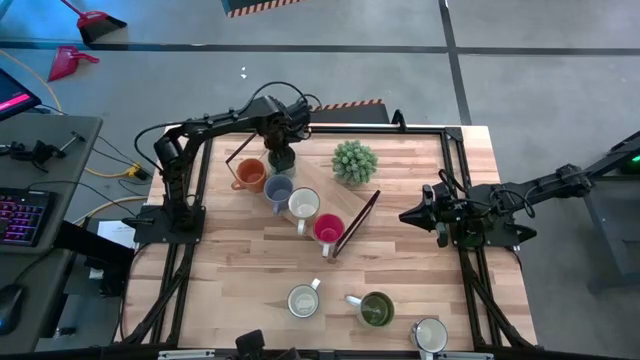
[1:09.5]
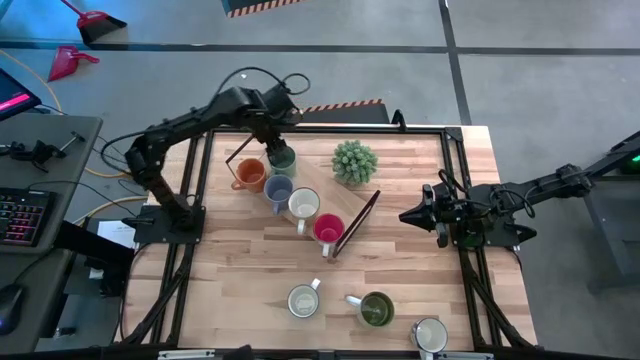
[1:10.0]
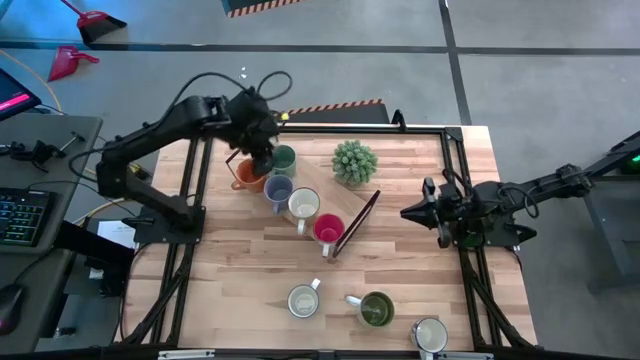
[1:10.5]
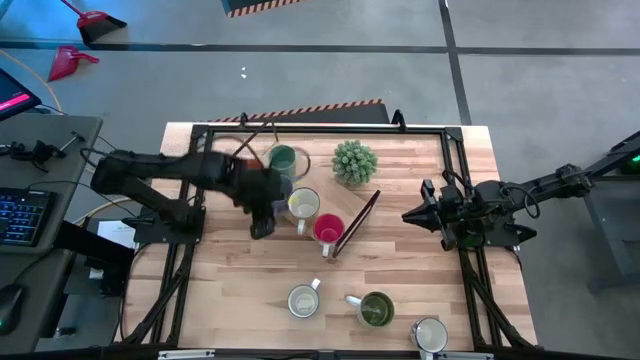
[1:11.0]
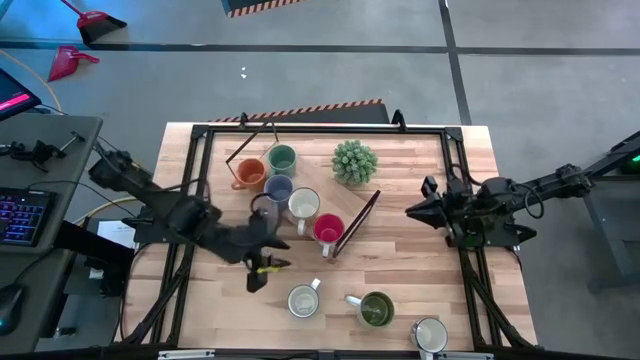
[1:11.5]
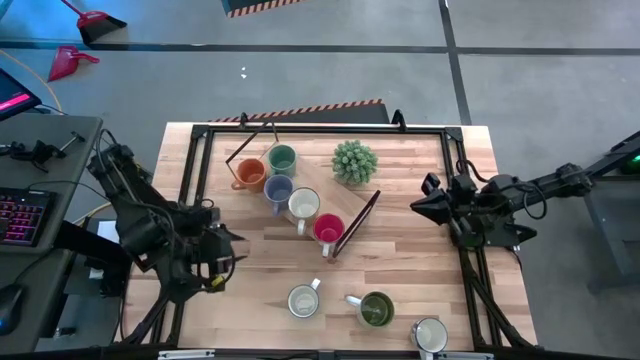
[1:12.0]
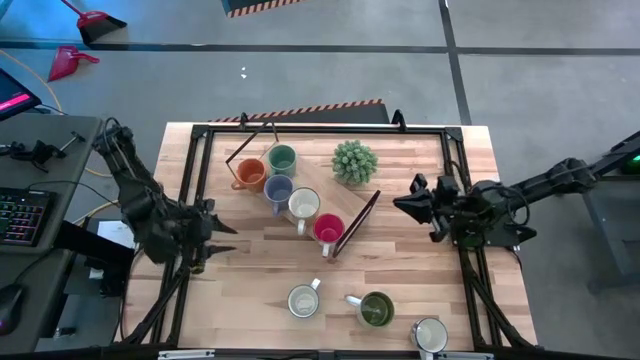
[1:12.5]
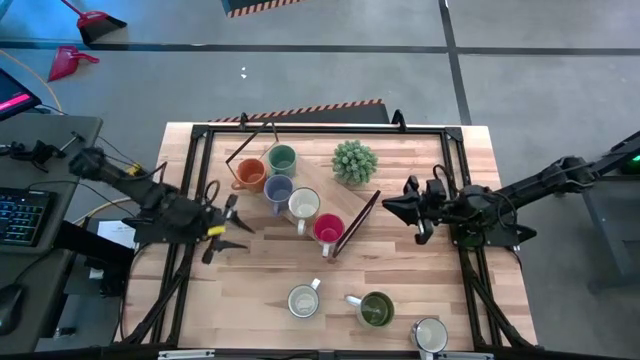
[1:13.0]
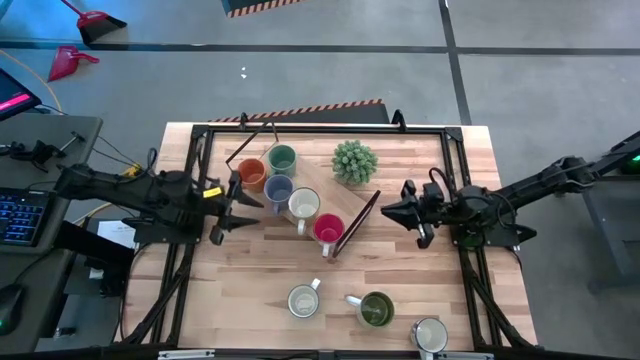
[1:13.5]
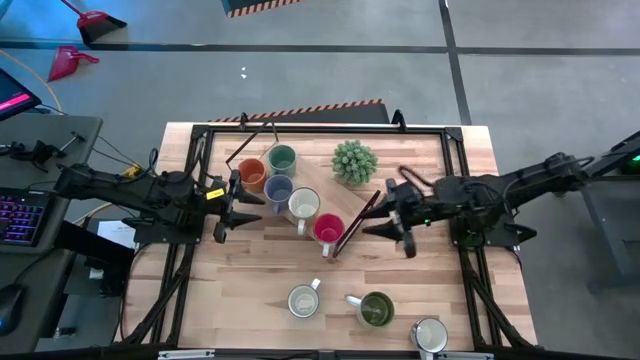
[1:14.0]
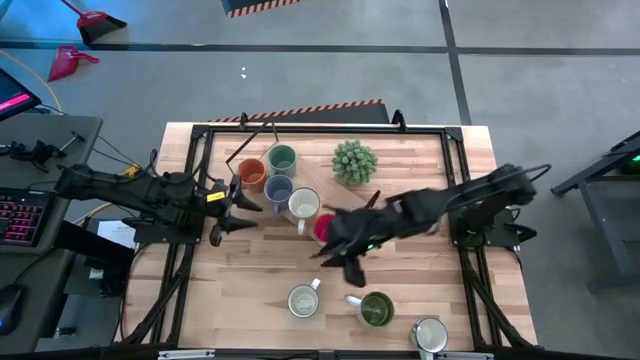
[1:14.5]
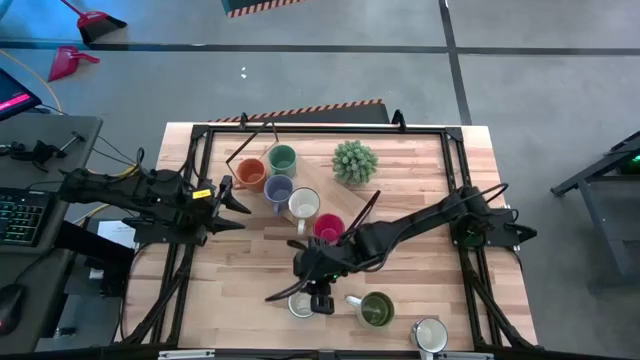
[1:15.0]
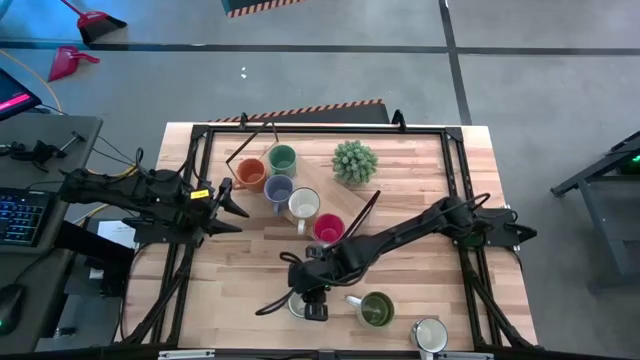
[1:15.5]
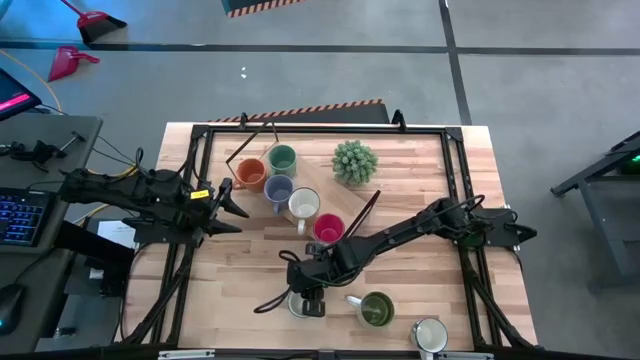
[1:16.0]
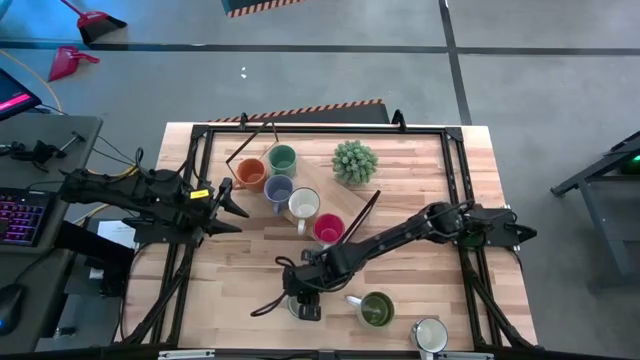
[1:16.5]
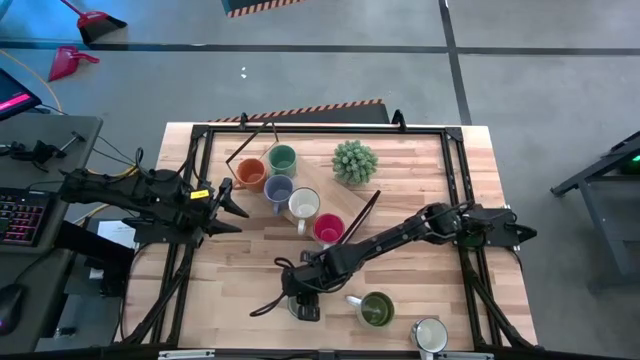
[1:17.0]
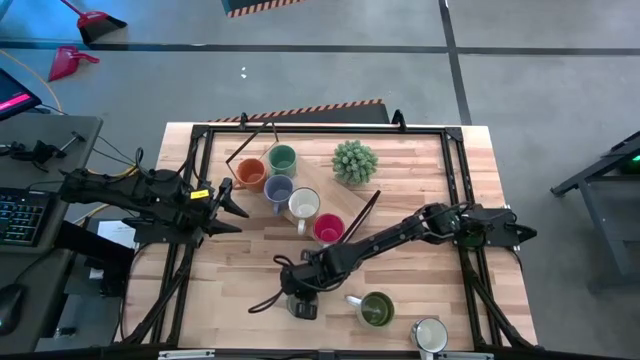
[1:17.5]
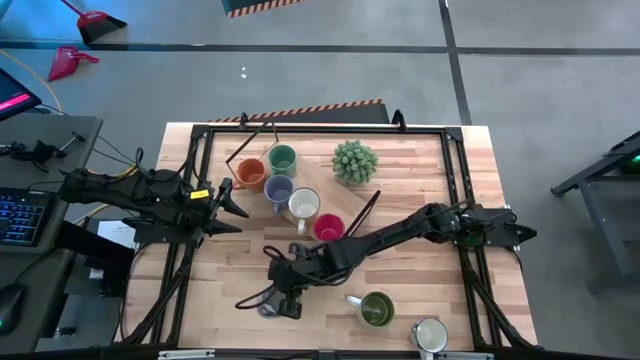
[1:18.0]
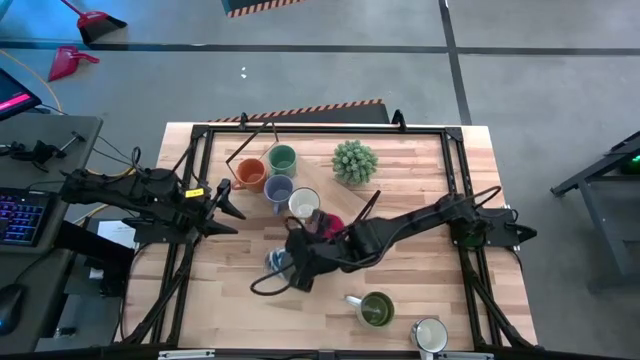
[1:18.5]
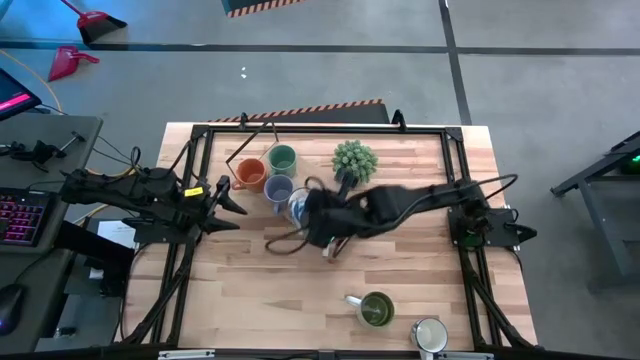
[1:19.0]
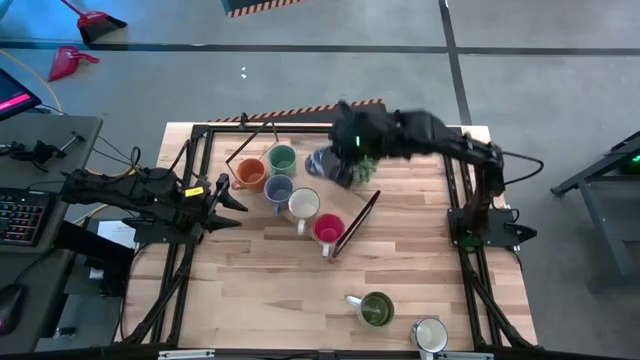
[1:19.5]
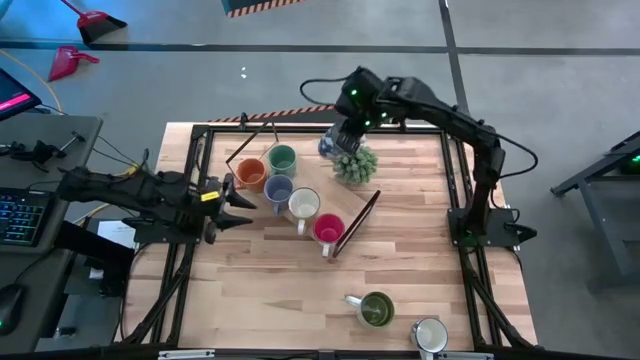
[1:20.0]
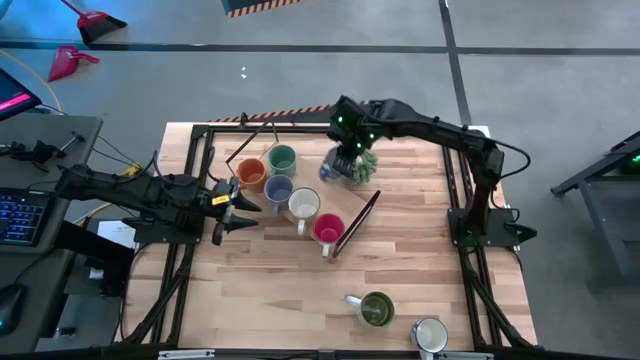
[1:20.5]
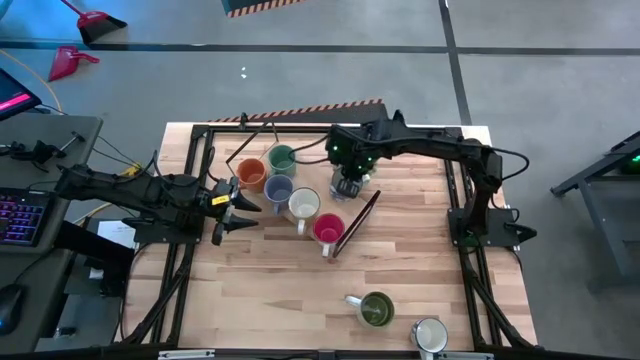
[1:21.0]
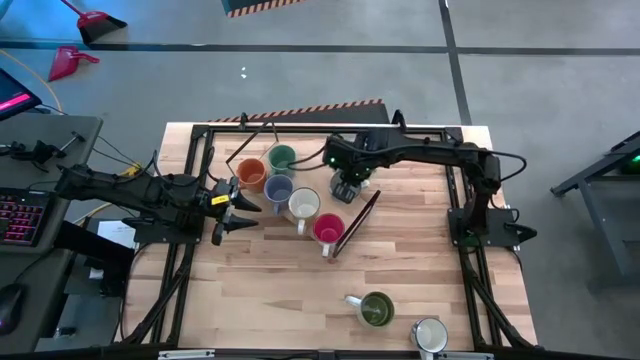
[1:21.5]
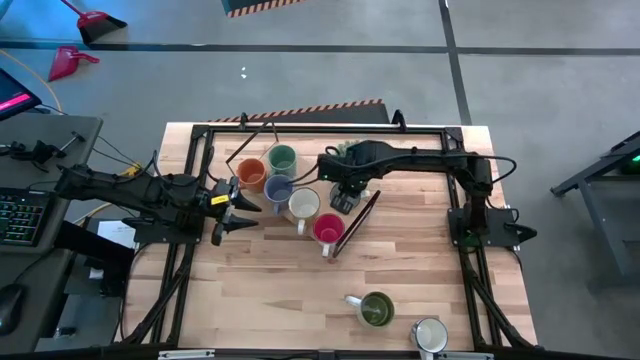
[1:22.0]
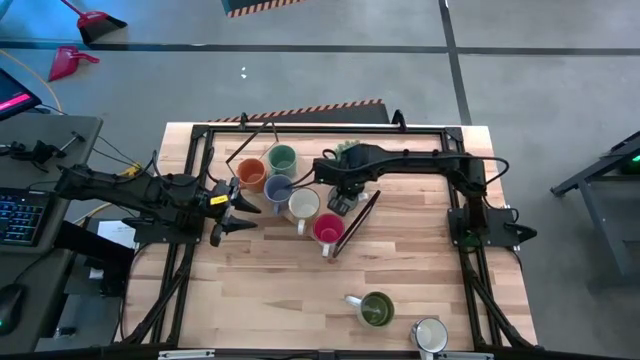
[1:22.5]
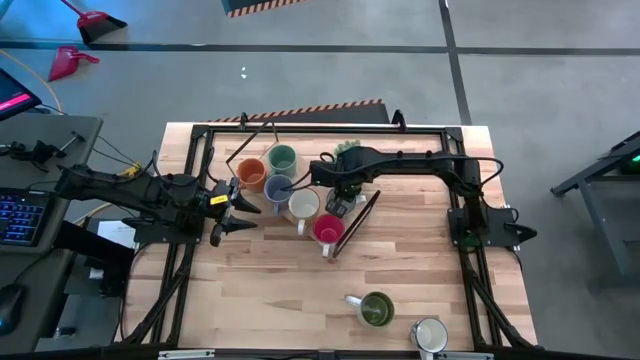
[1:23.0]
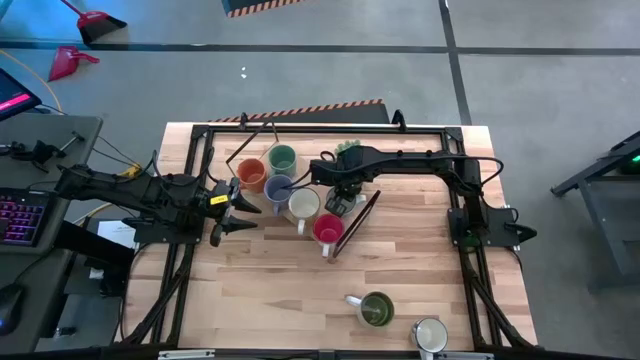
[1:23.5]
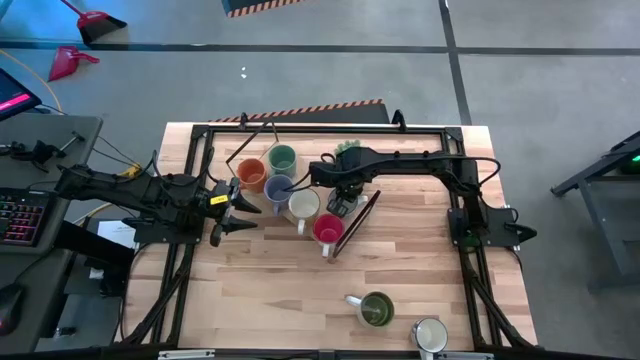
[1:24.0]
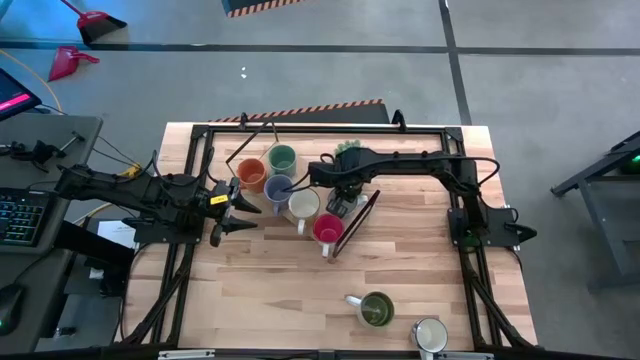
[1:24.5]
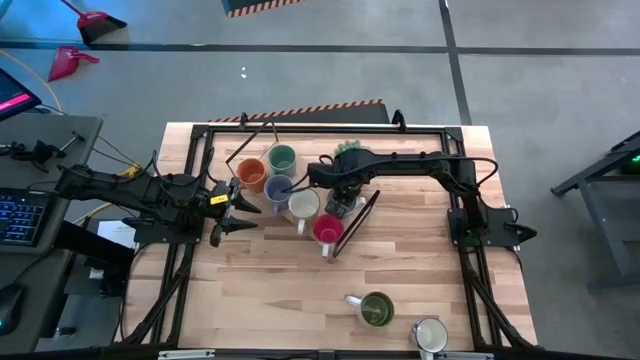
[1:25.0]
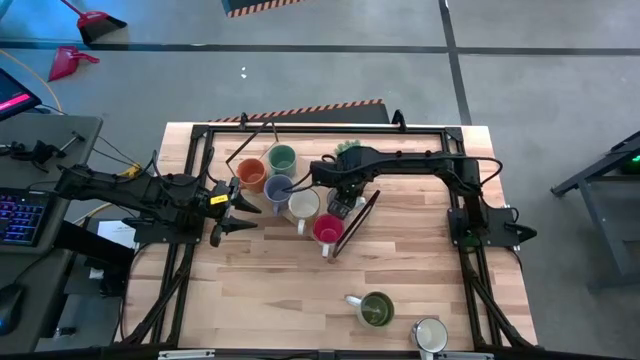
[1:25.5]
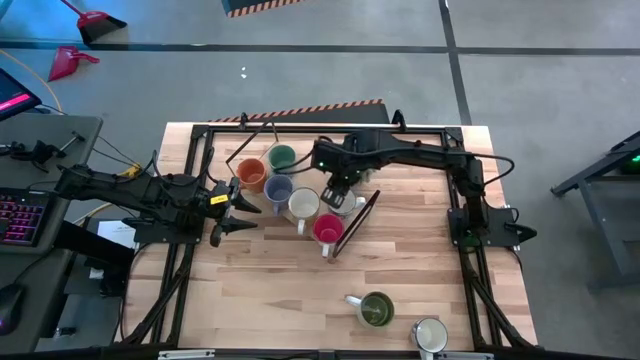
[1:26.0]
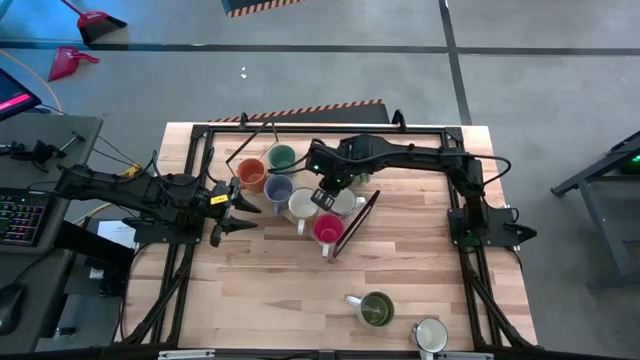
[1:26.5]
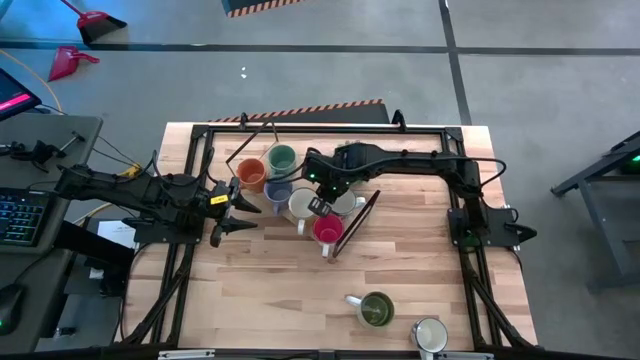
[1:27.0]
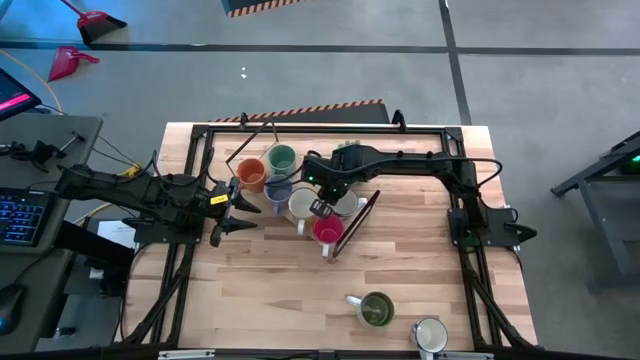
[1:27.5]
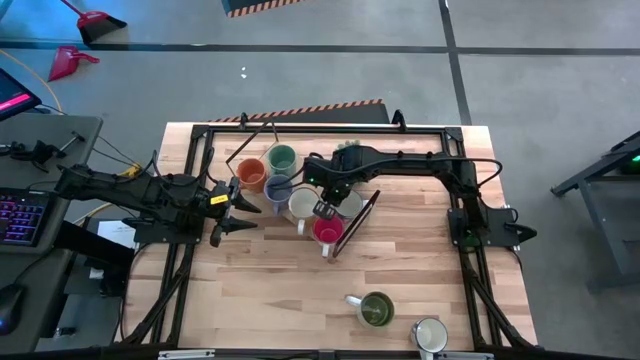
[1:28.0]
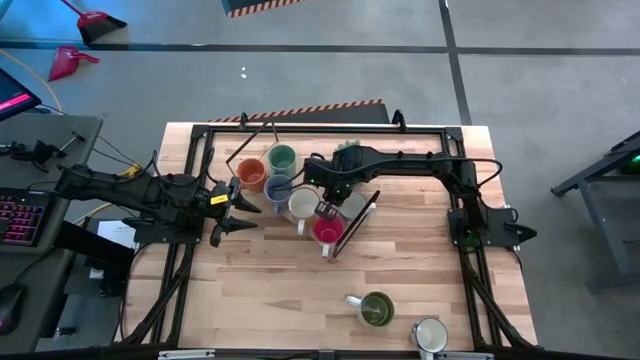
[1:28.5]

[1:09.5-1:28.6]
Task: Place coffee mugs
Put the left blue patterned mug on the shelf

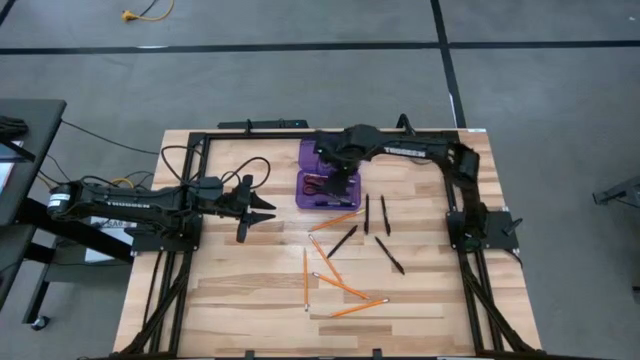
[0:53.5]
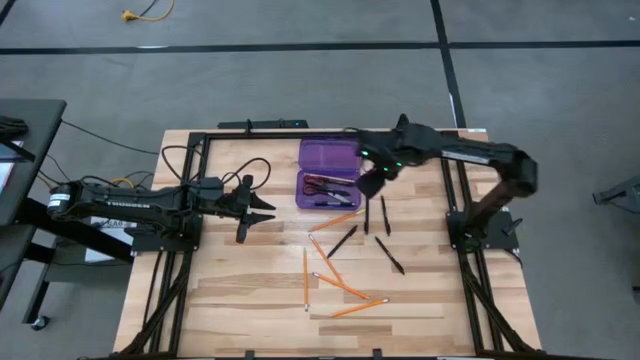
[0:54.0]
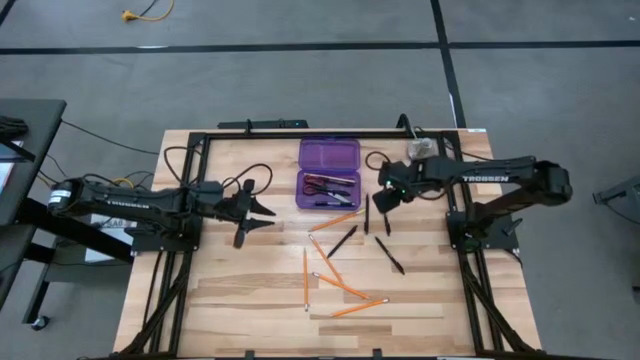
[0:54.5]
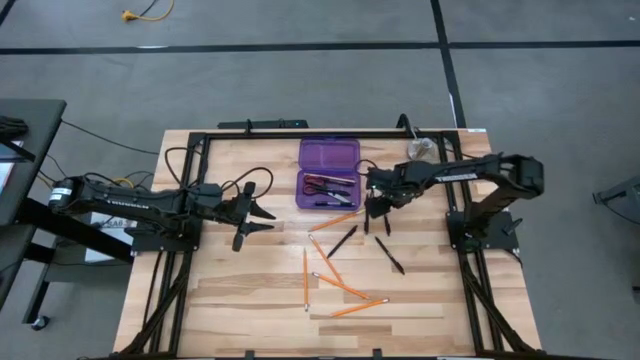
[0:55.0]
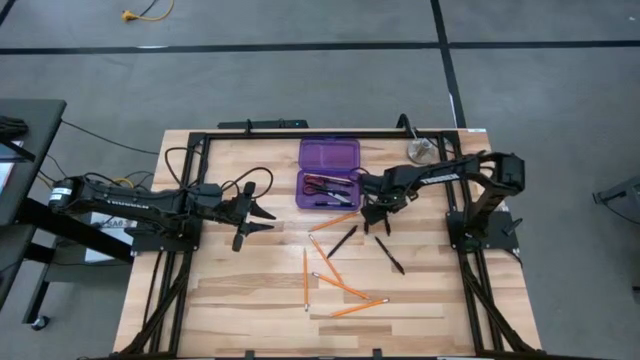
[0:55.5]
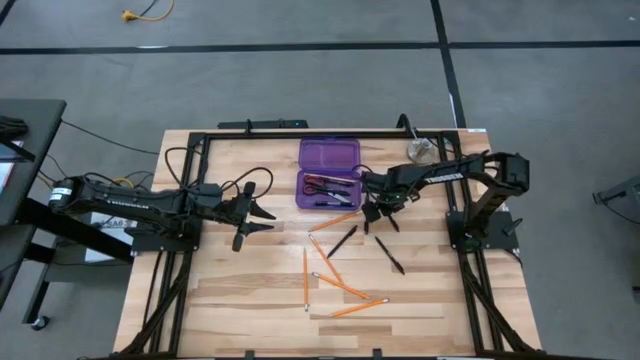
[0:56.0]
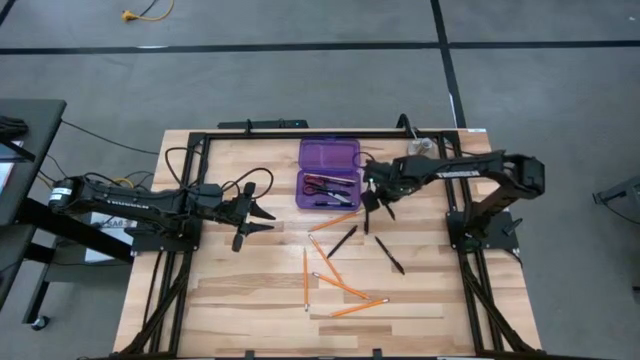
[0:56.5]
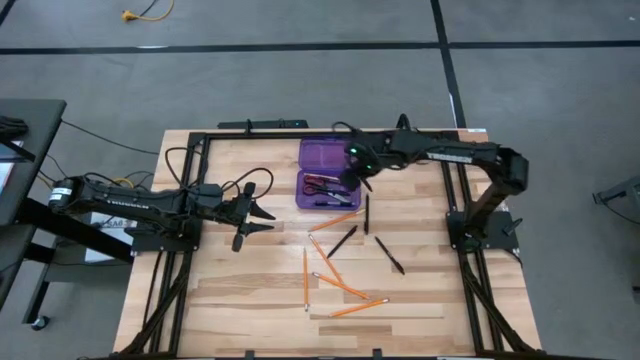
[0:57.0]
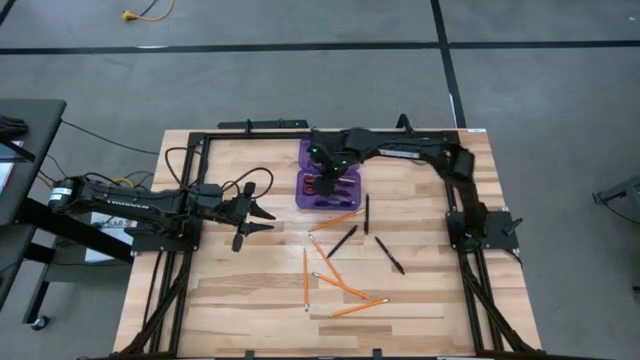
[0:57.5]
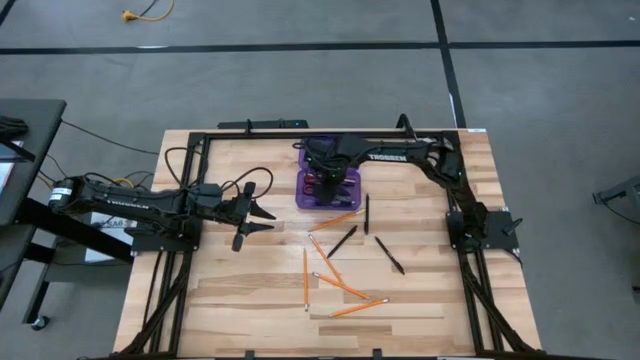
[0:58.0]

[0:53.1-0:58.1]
Task: Pick & place school supplies into a supply box
Put the black pen into the violet supply box
